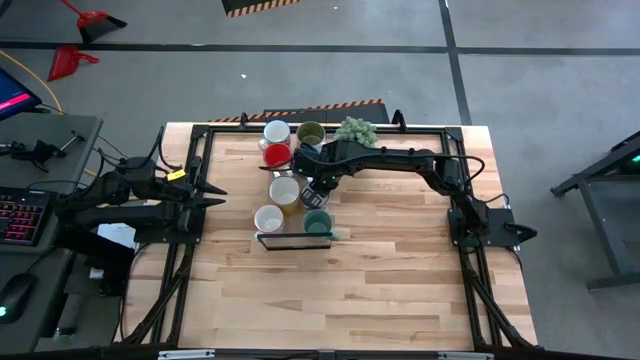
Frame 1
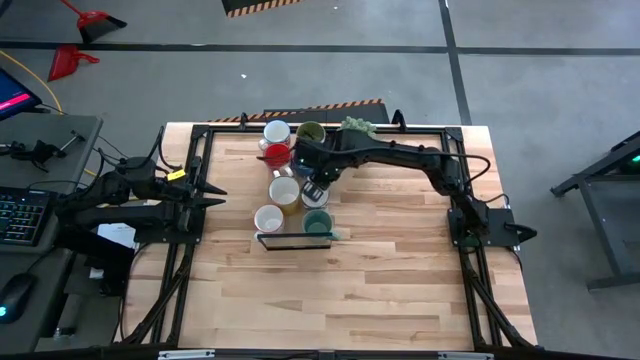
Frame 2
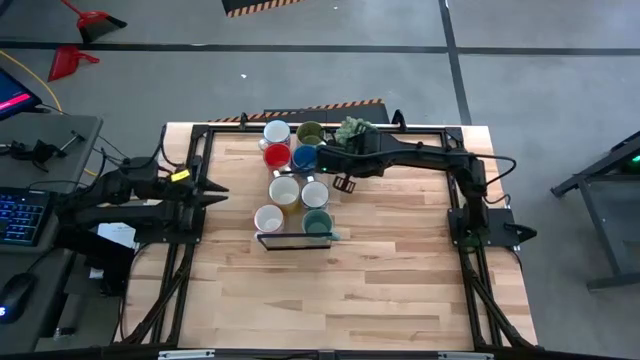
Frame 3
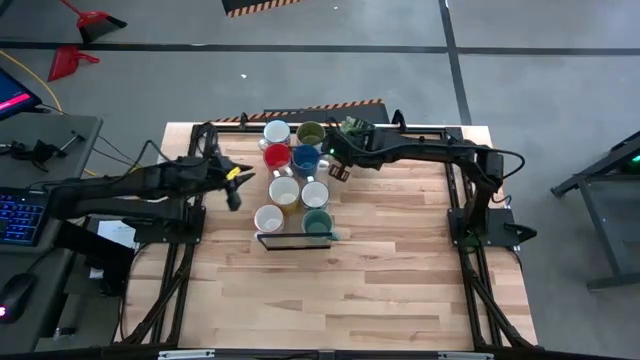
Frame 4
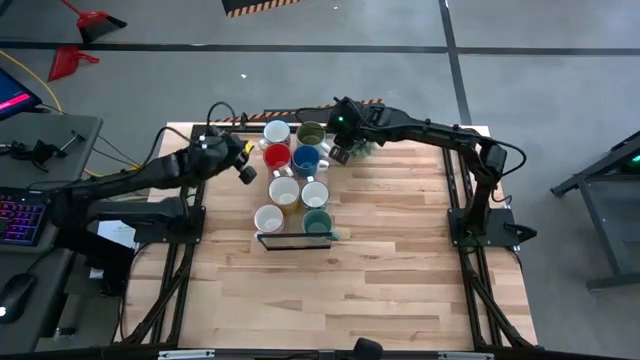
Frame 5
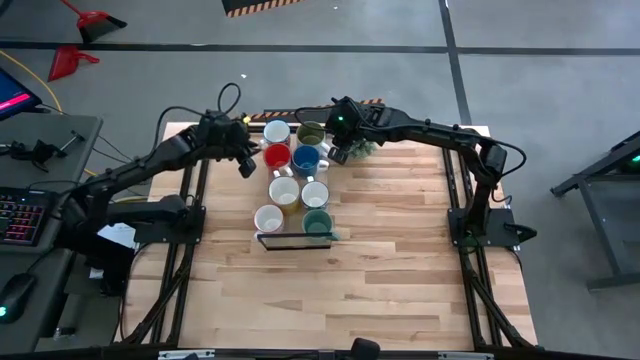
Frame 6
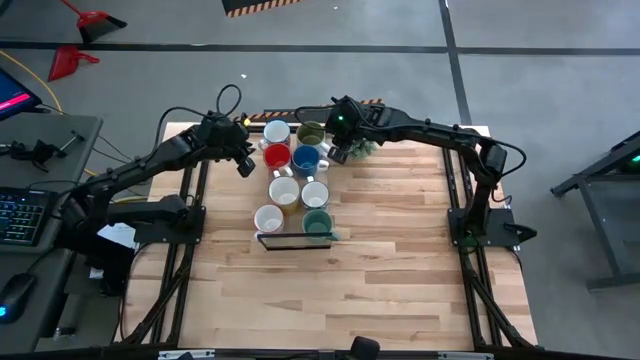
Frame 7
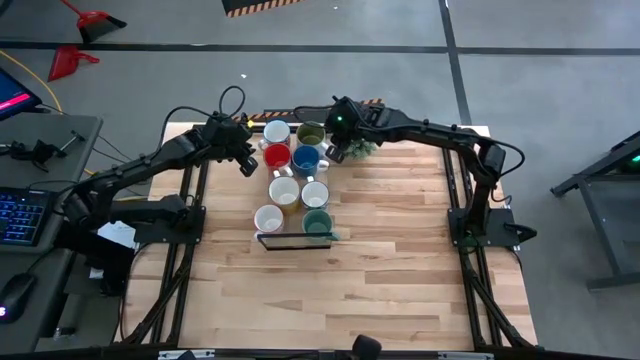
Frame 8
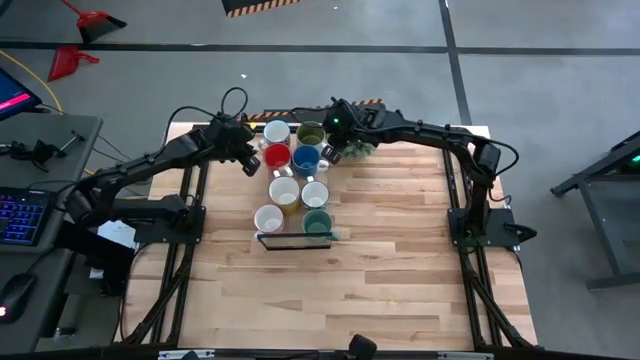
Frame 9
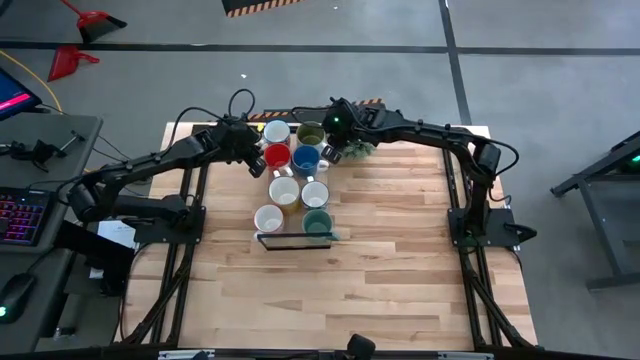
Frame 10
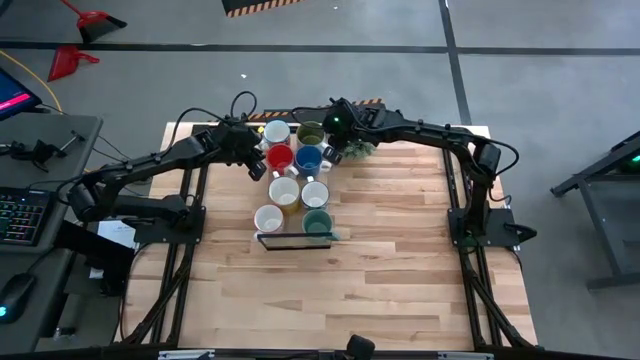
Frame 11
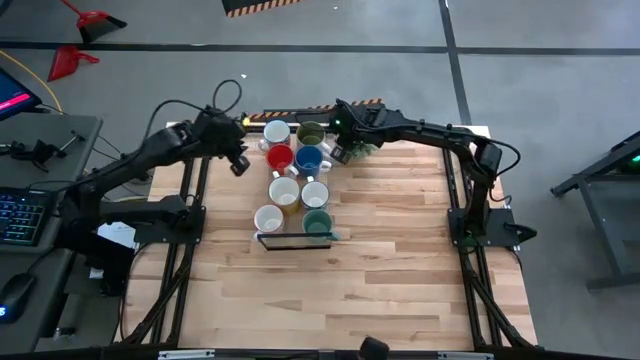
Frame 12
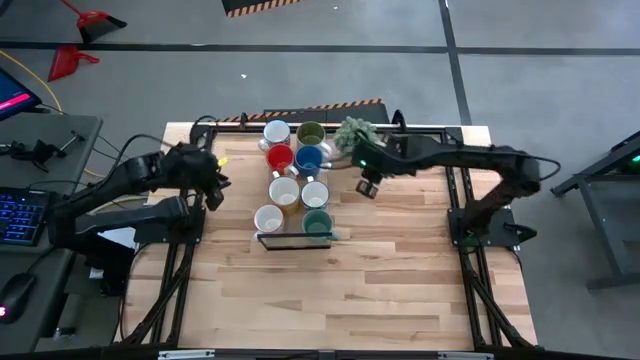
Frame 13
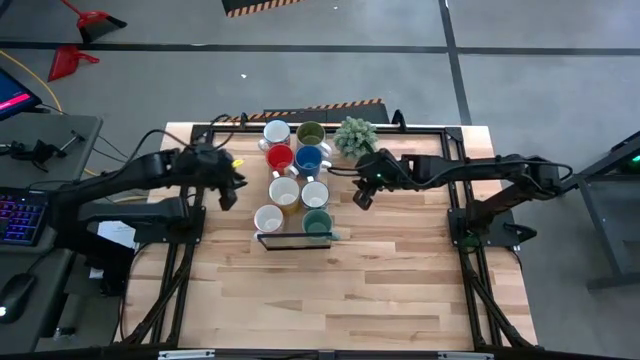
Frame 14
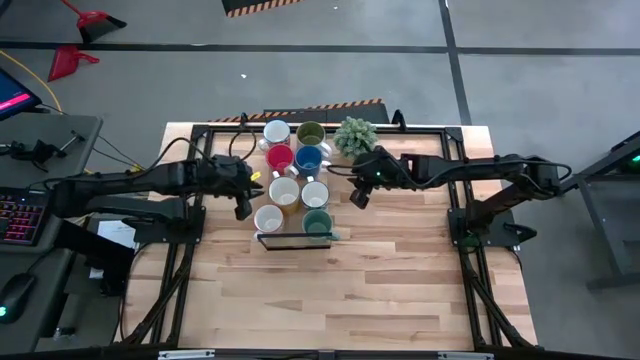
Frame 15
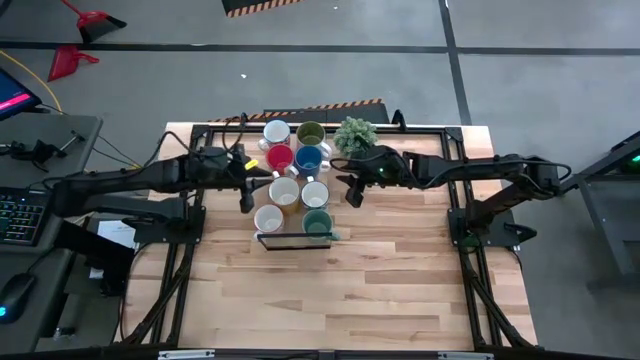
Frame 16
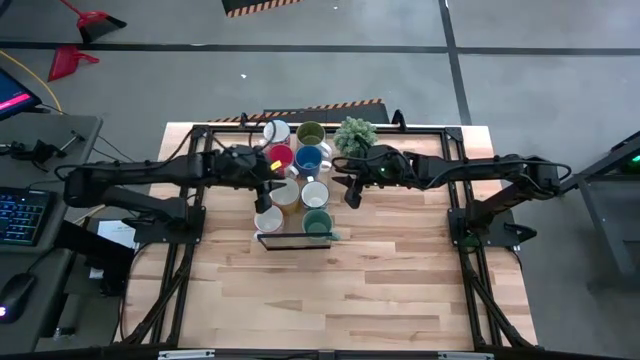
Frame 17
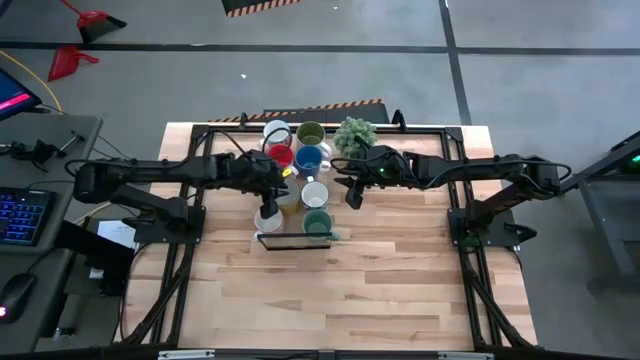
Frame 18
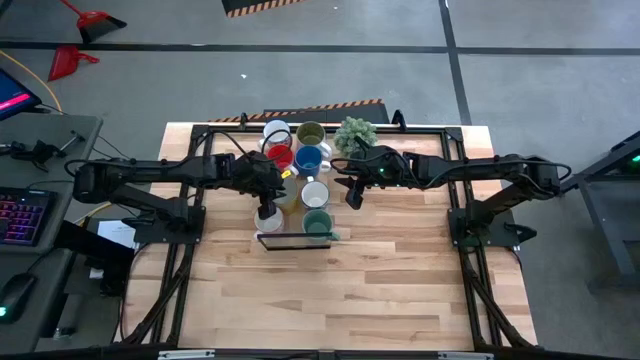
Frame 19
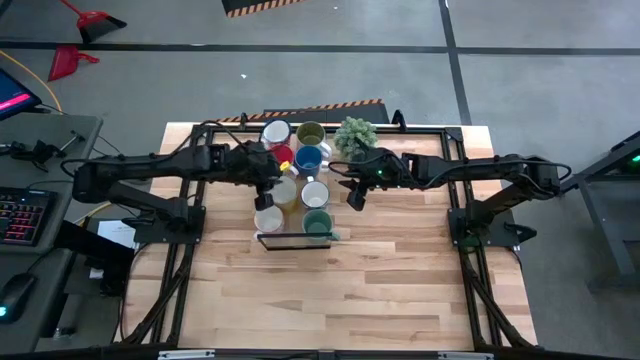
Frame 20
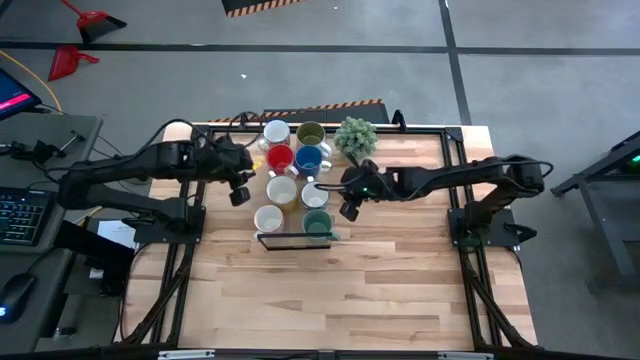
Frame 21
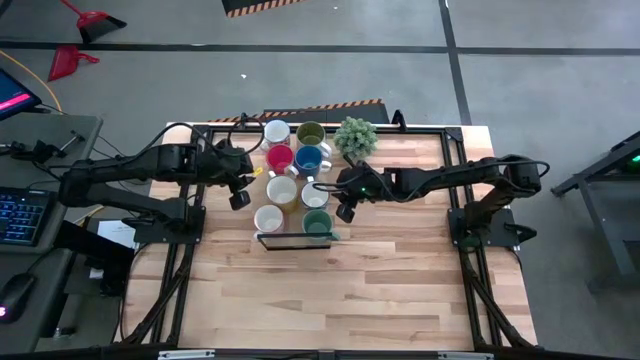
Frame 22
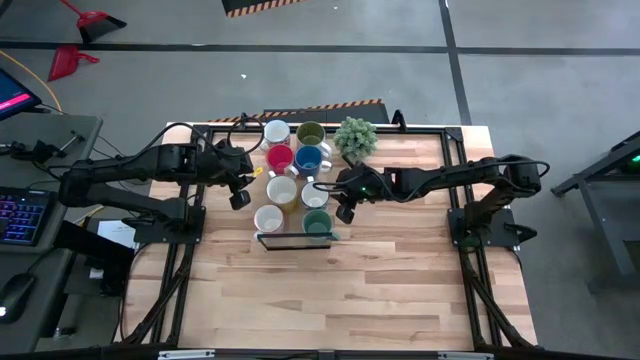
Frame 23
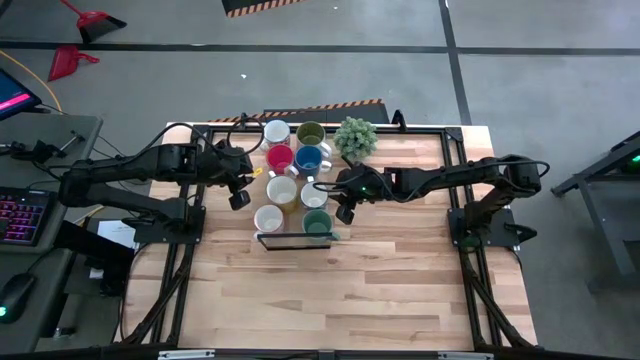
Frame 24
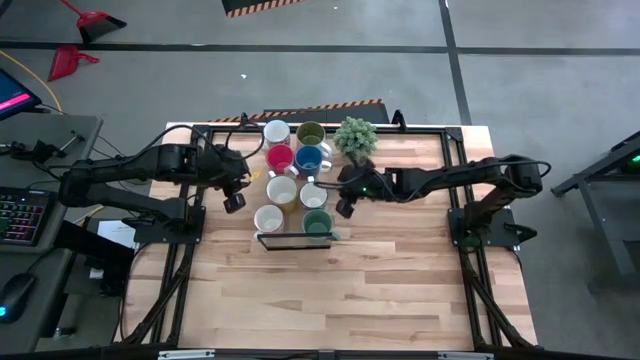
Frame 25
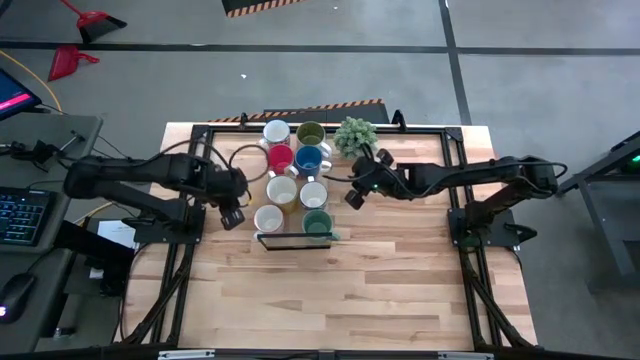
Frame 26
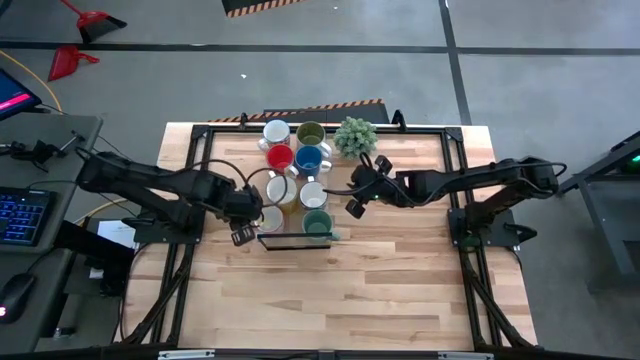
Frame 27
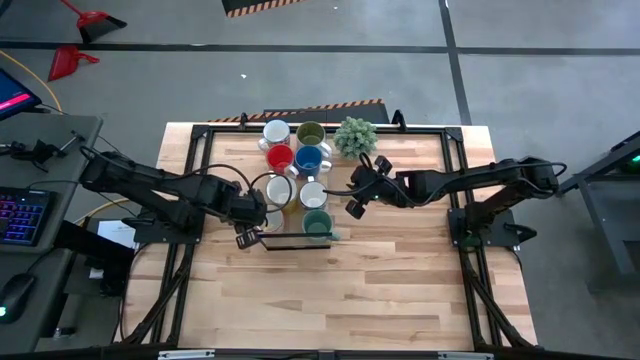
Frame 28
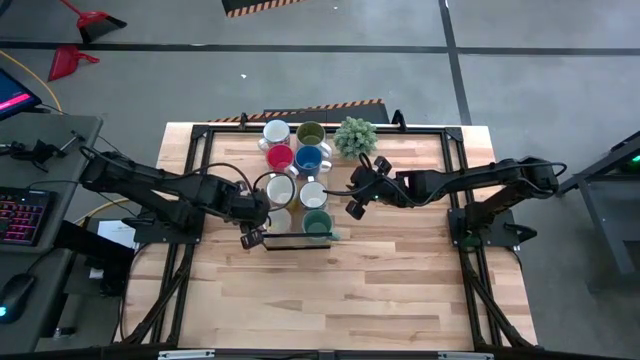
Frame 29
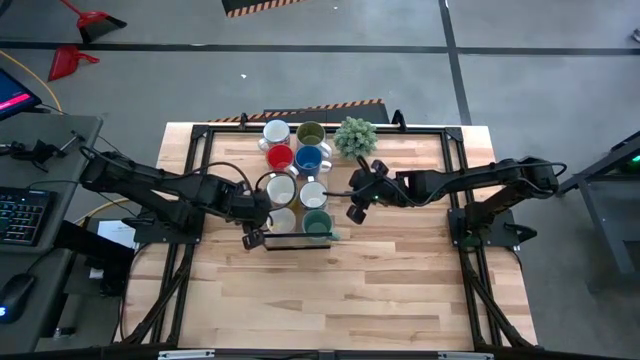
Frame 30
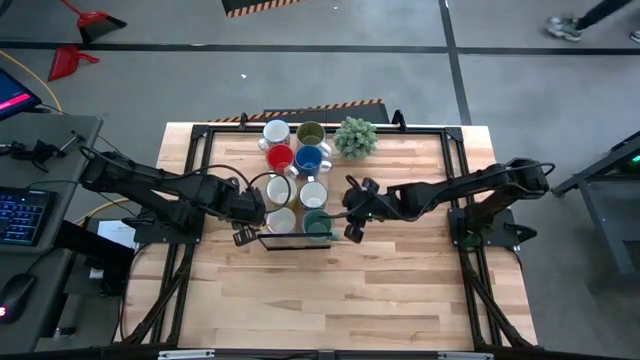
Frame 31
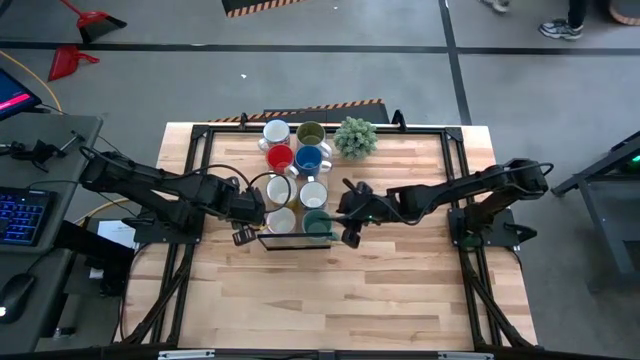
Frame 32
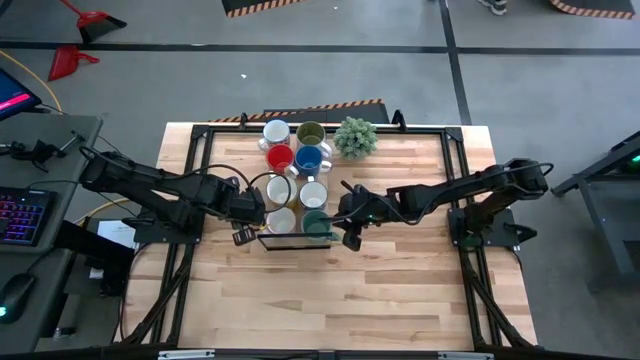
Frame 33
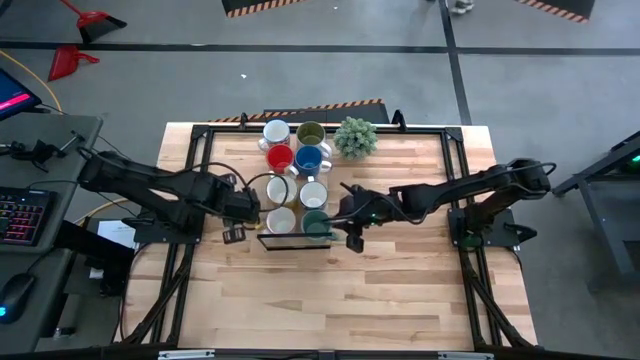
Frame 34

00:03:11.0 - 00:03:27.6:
Task: Place coffee mugs
Adjust the mugs on the shelf

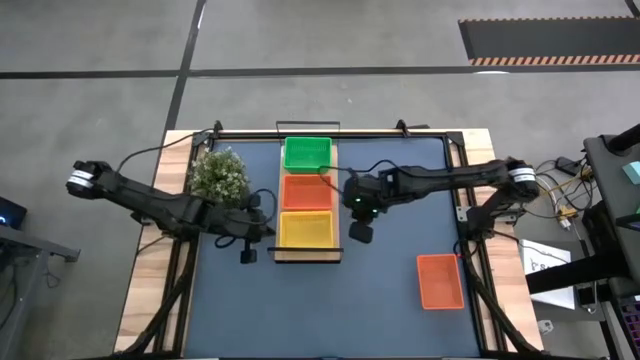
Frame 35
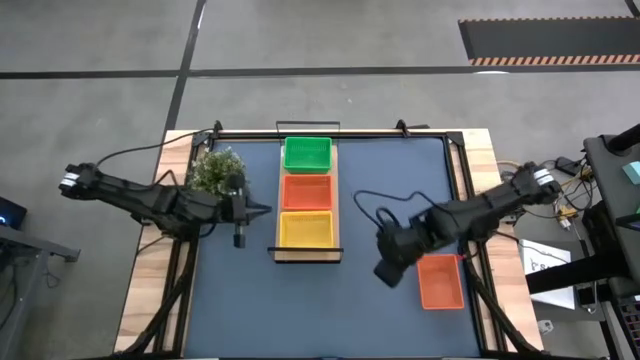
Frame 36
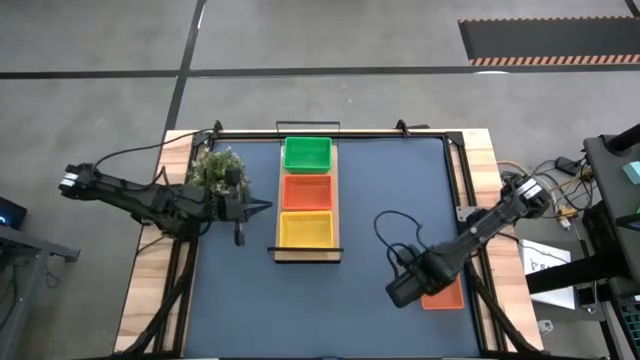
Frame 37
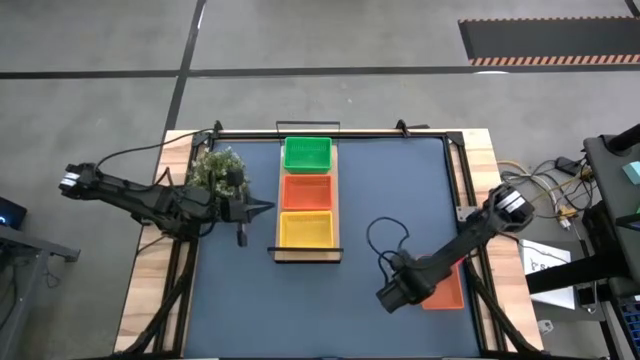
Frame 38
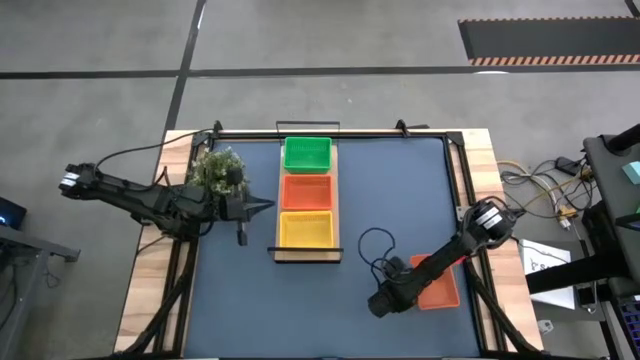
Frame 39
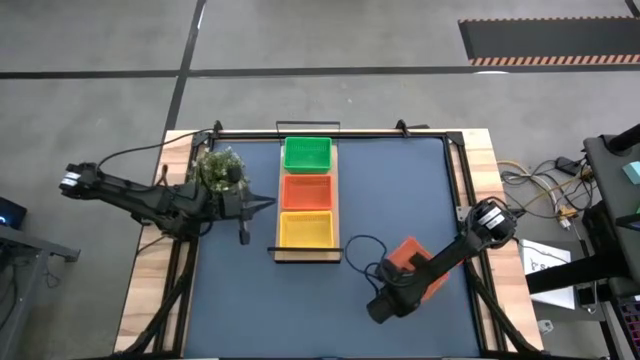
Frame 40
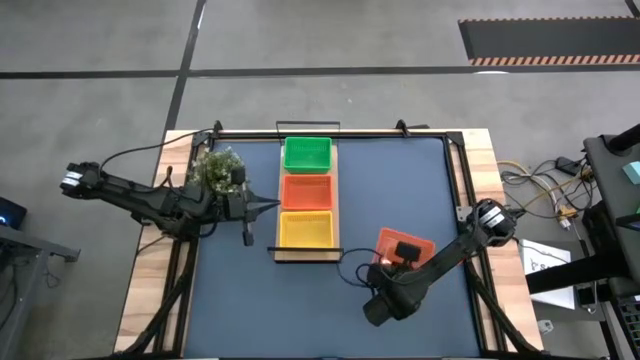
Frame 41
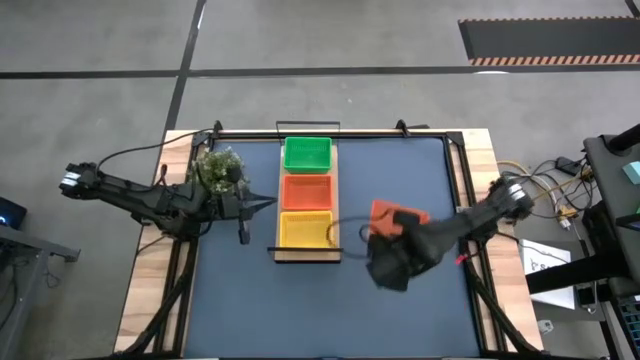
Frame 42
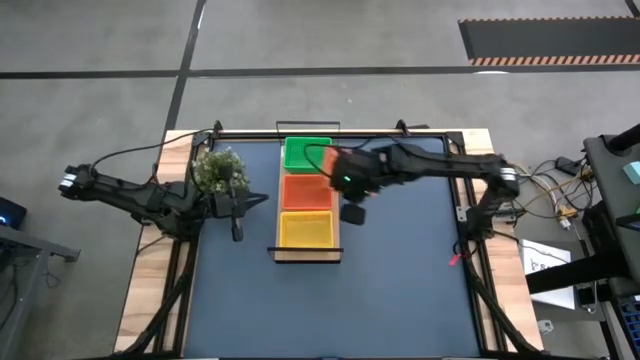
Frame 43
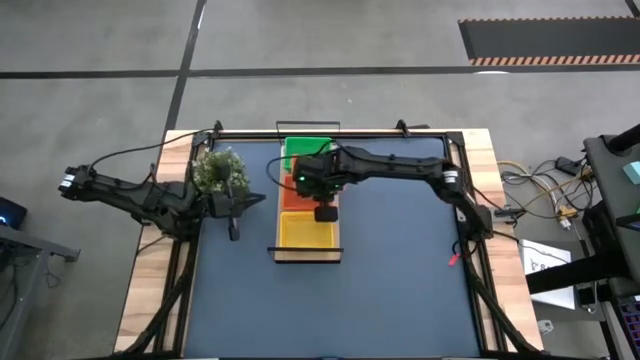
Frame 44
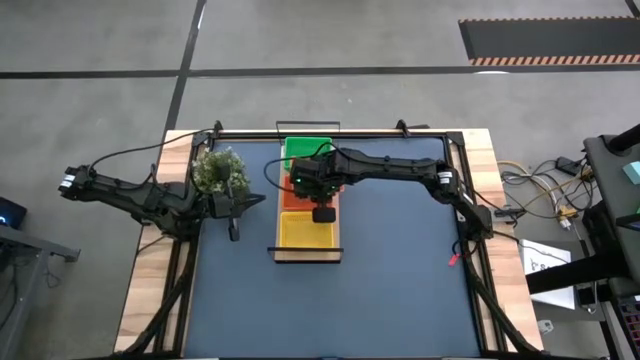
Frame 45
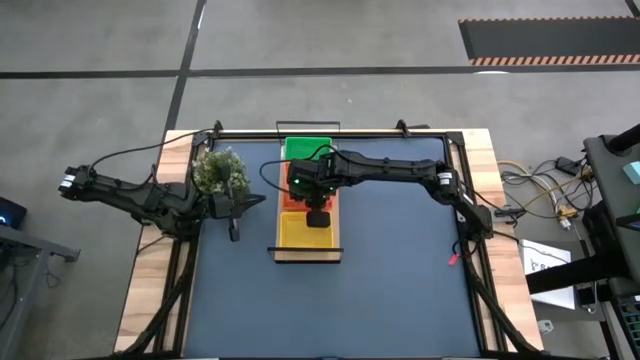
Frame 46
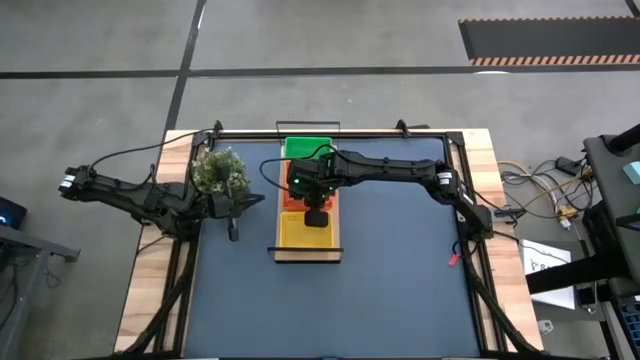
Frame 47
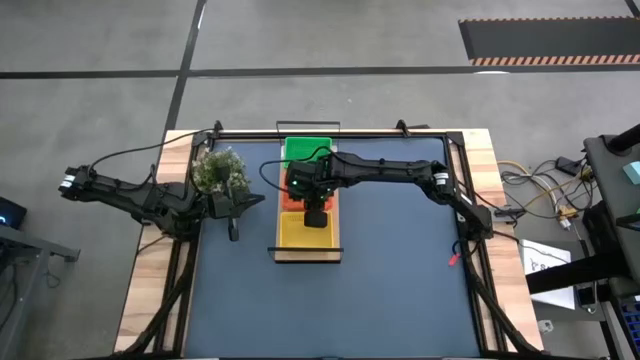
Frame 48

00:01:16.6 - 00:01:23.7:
Task: Stack baskets on shelf by color
Stack the orange bin on the orange bin on the shelf
